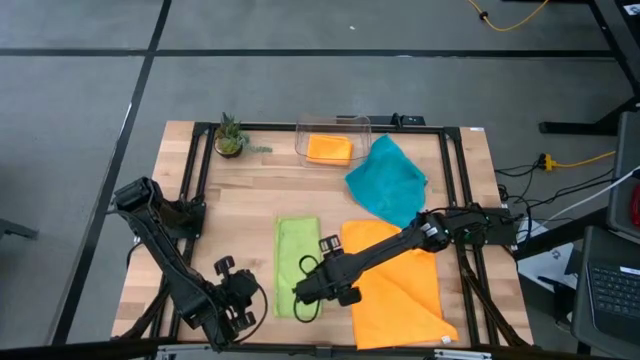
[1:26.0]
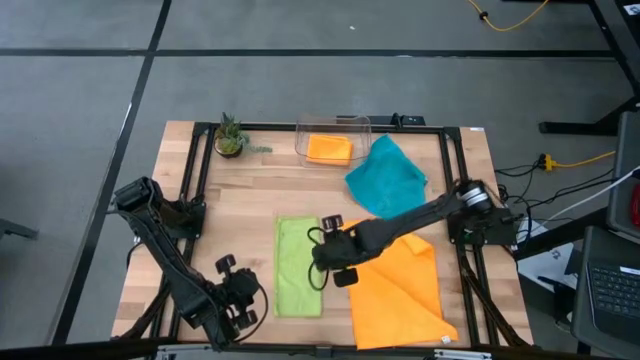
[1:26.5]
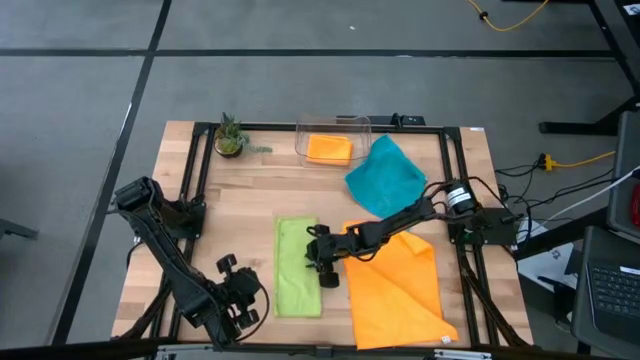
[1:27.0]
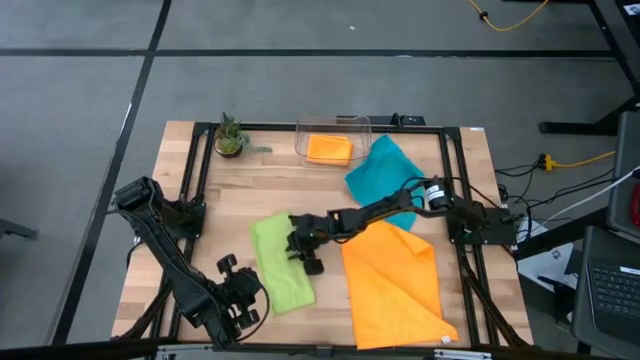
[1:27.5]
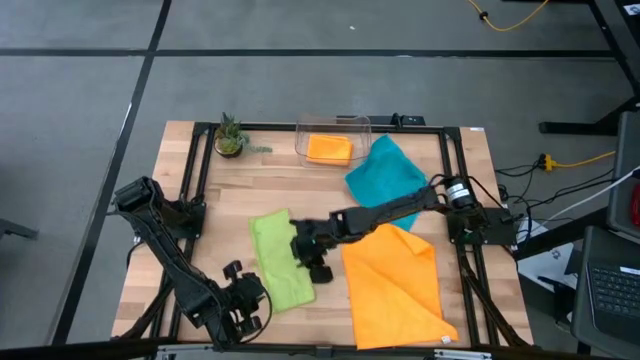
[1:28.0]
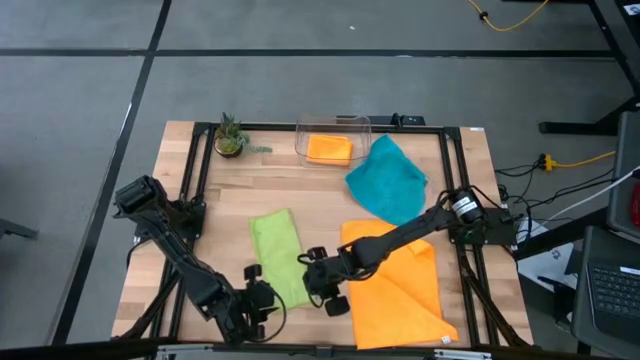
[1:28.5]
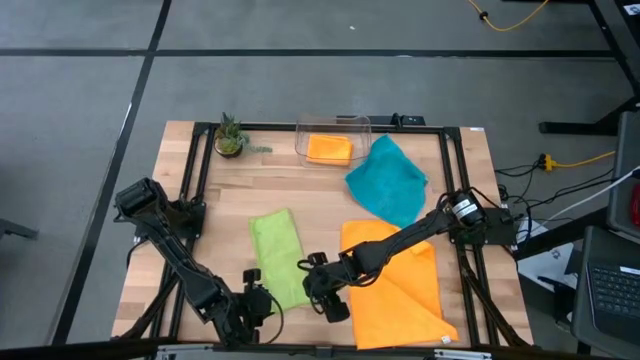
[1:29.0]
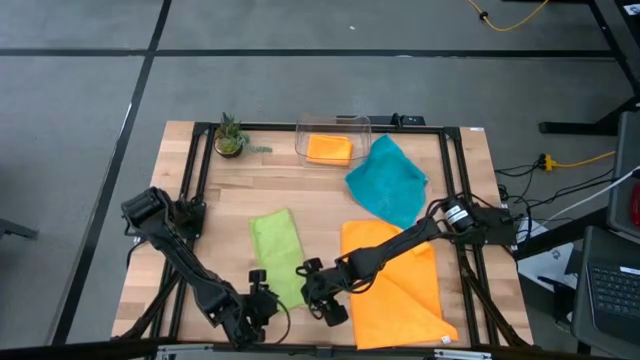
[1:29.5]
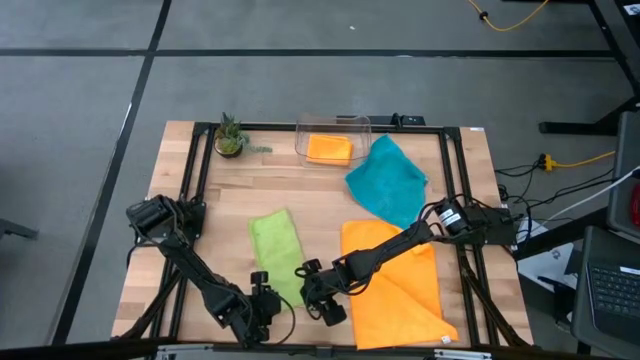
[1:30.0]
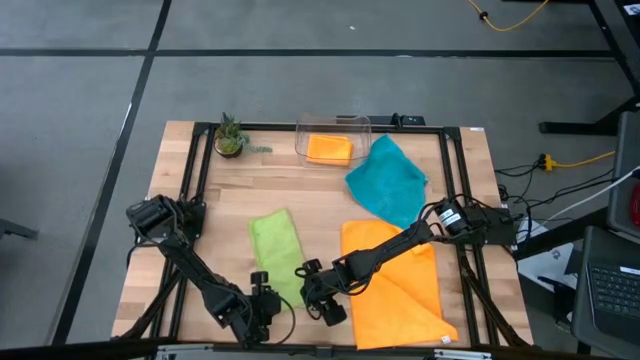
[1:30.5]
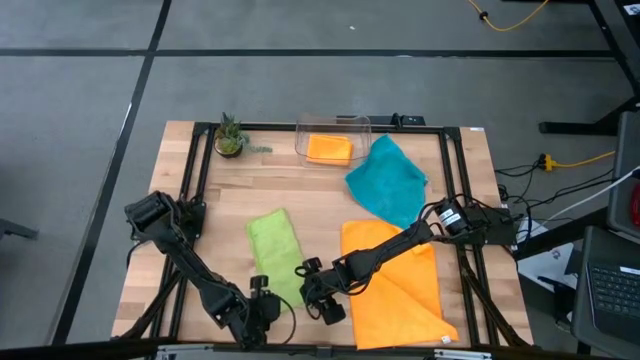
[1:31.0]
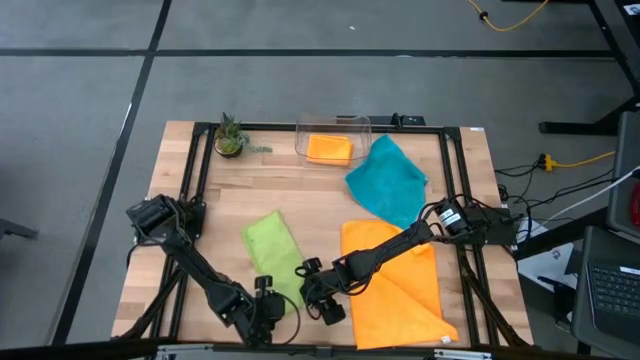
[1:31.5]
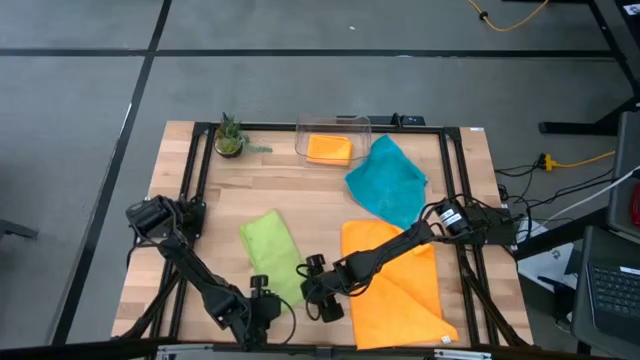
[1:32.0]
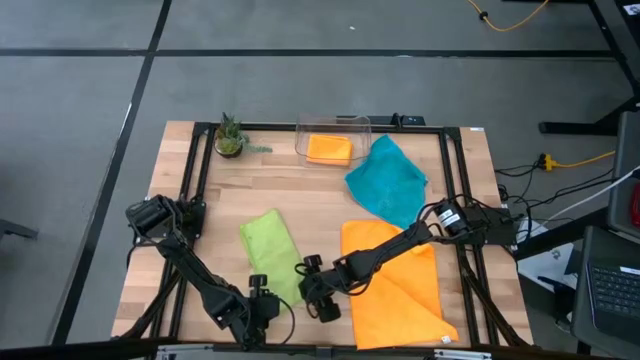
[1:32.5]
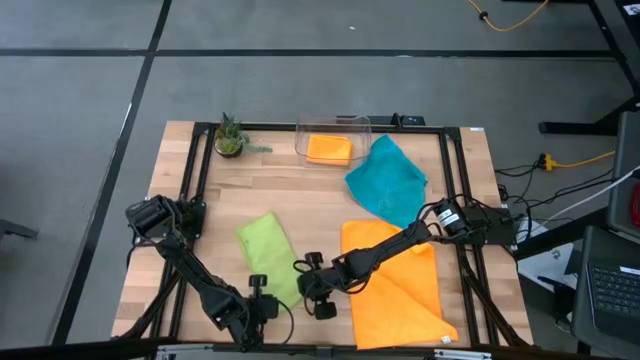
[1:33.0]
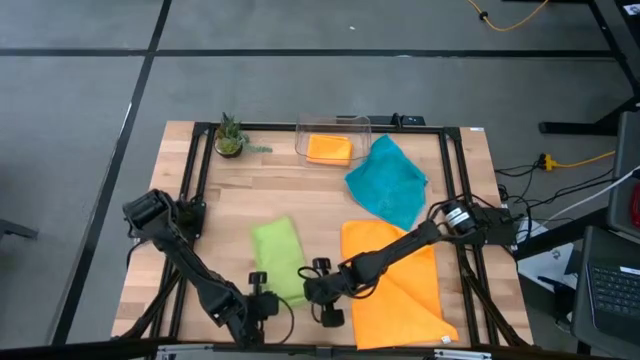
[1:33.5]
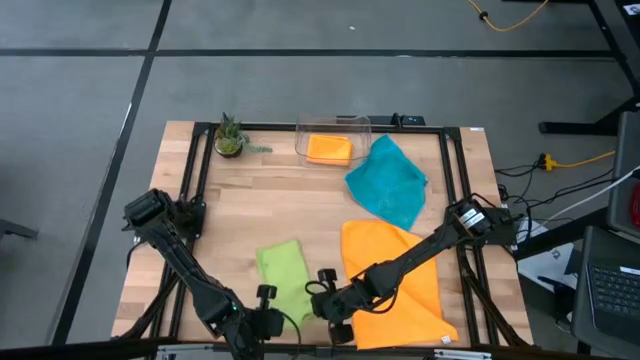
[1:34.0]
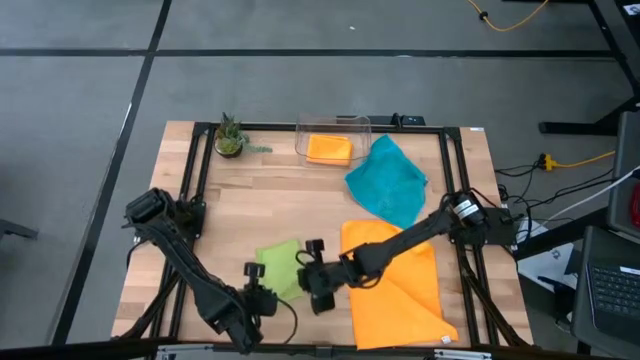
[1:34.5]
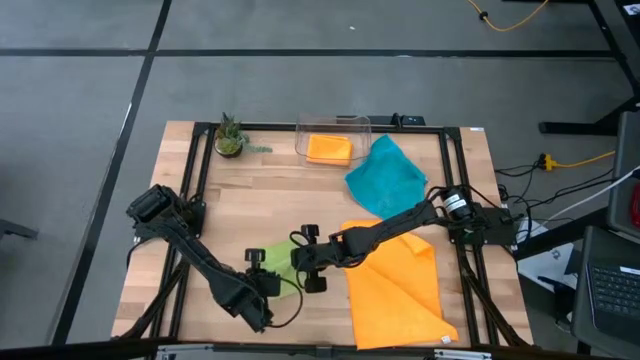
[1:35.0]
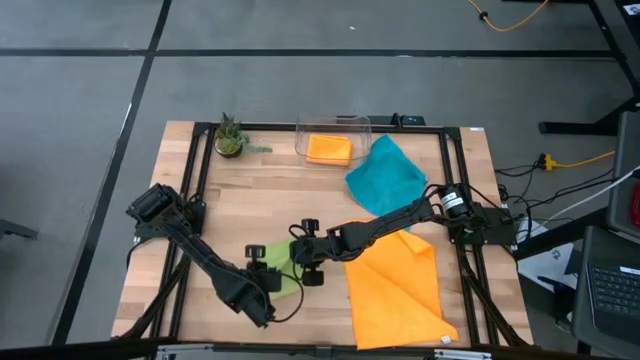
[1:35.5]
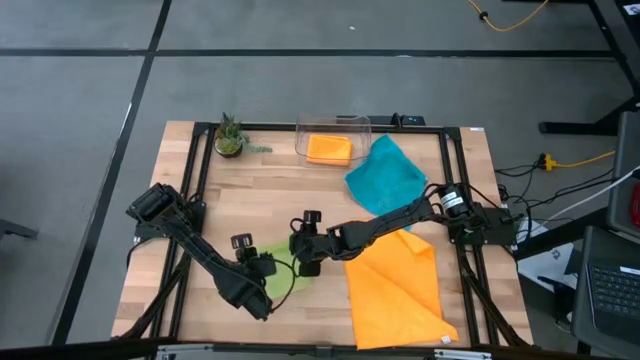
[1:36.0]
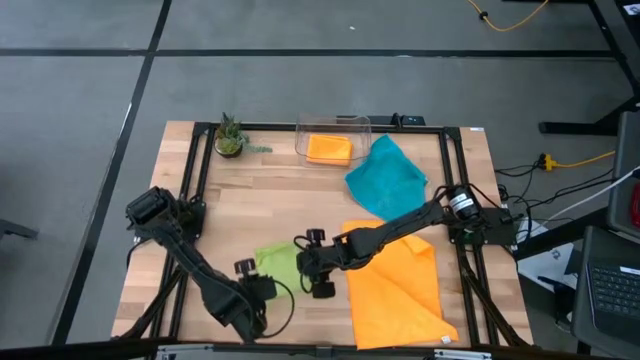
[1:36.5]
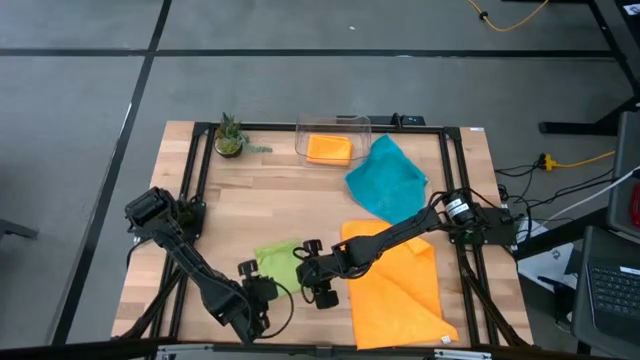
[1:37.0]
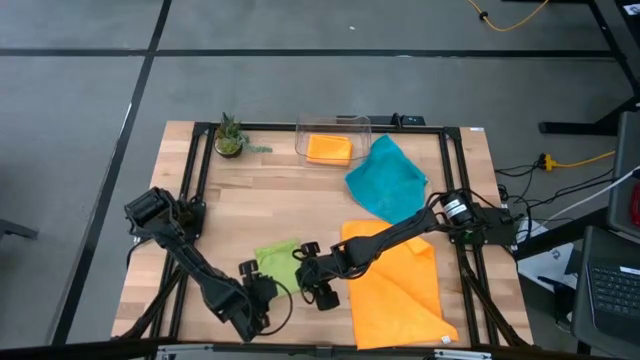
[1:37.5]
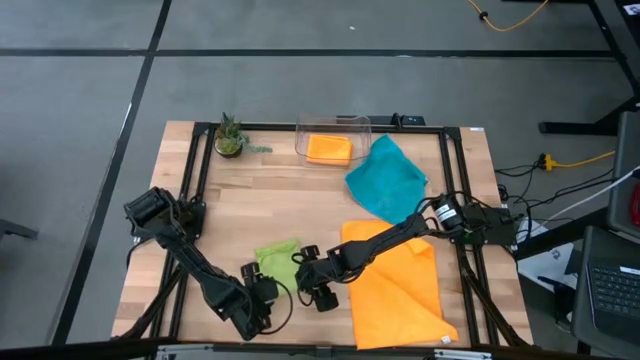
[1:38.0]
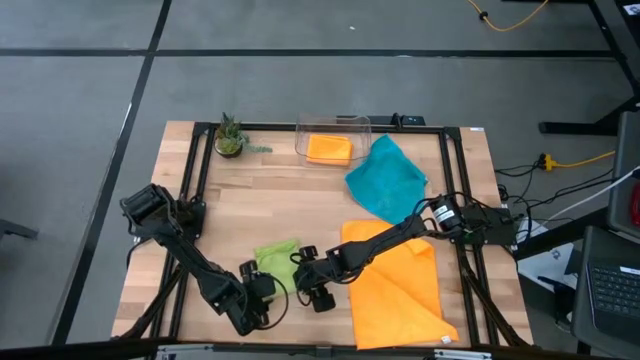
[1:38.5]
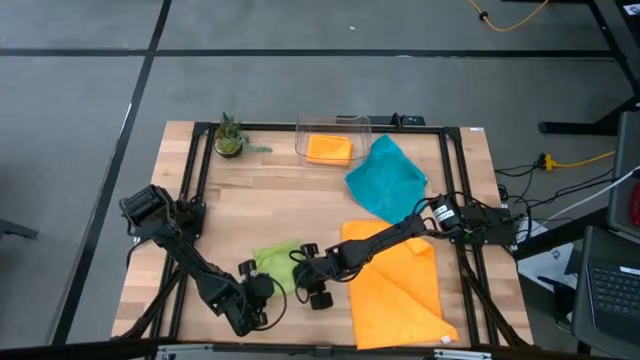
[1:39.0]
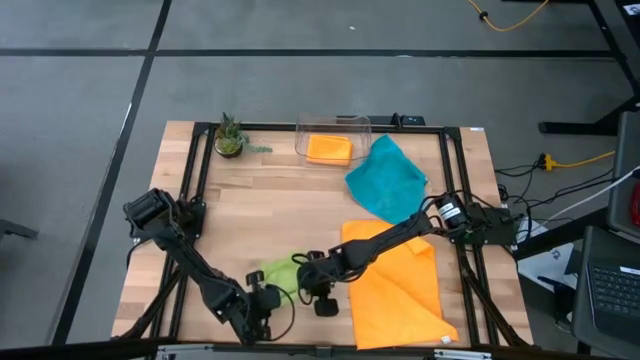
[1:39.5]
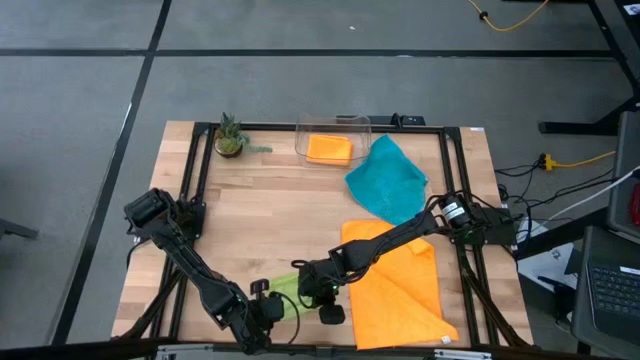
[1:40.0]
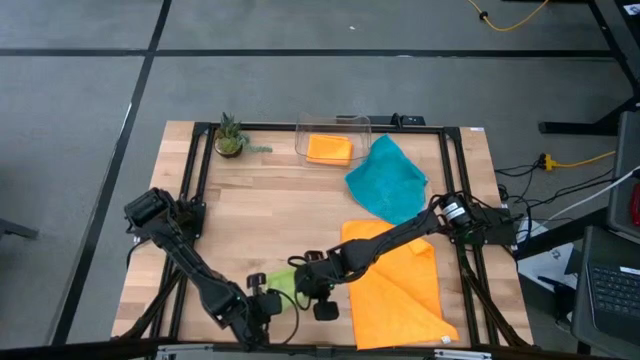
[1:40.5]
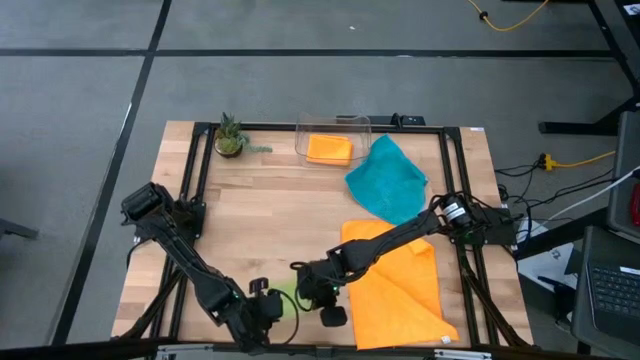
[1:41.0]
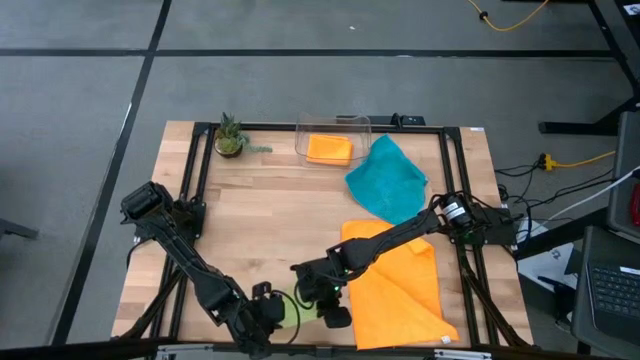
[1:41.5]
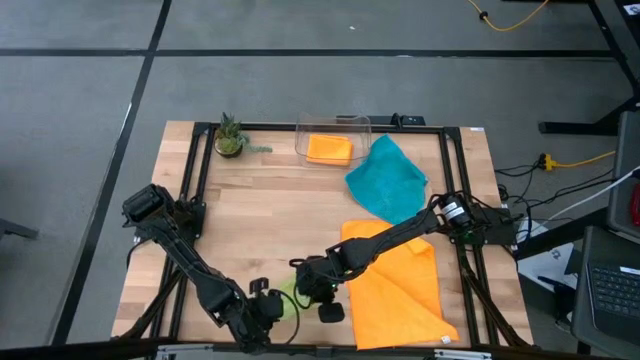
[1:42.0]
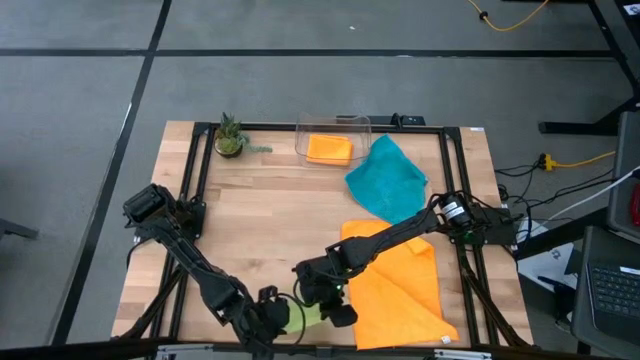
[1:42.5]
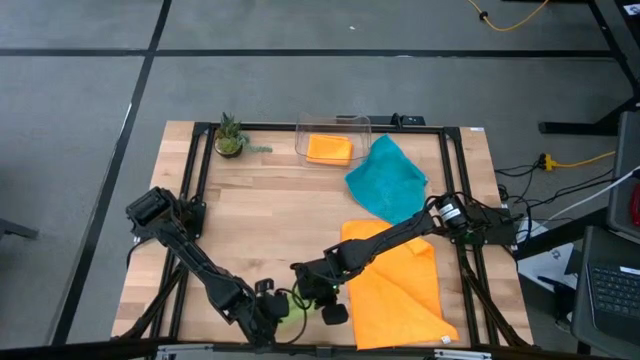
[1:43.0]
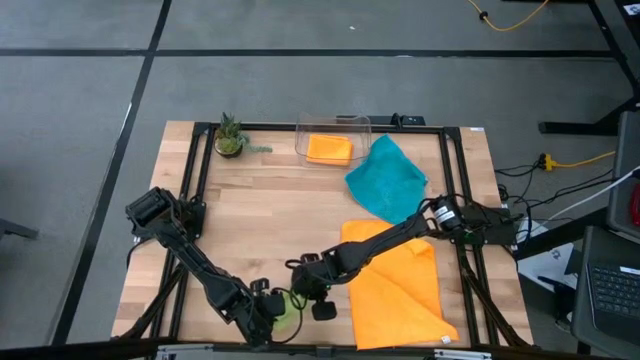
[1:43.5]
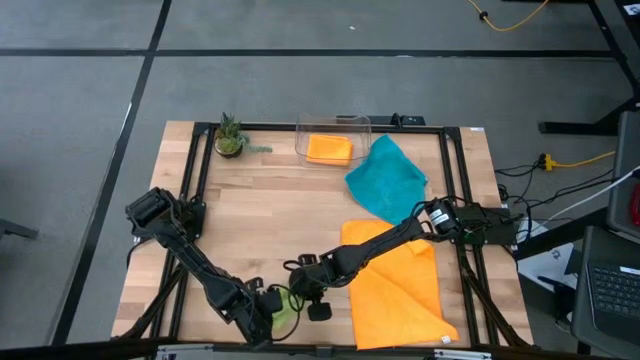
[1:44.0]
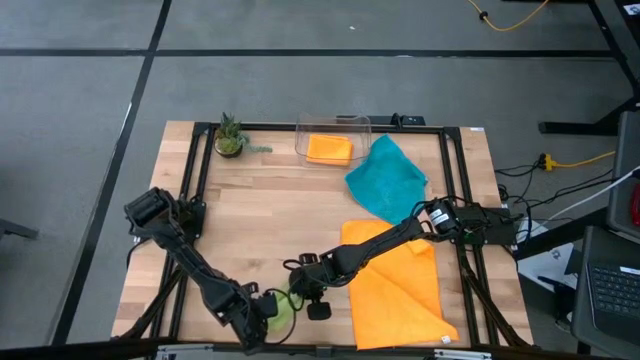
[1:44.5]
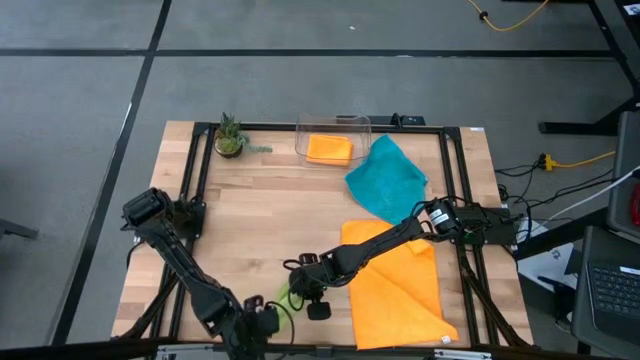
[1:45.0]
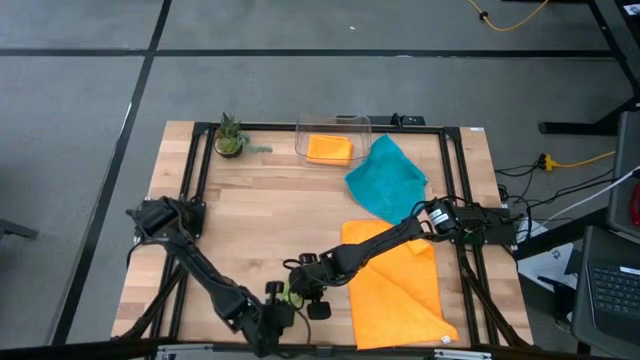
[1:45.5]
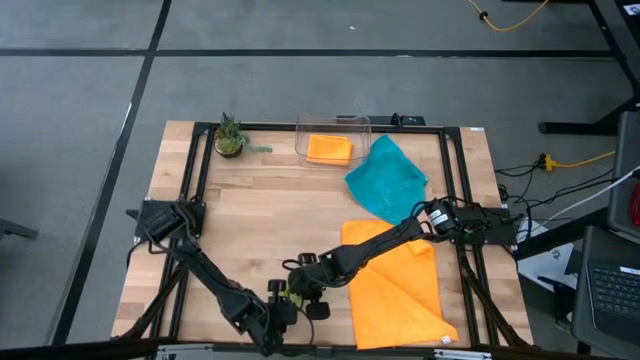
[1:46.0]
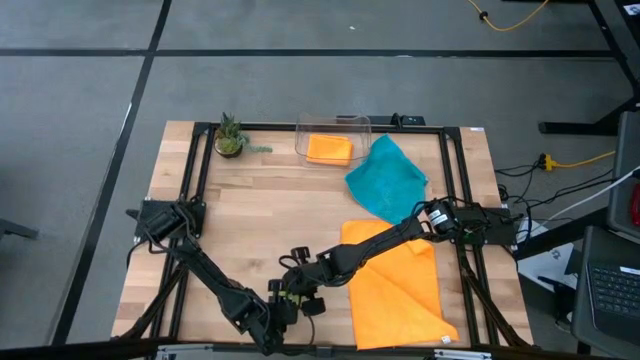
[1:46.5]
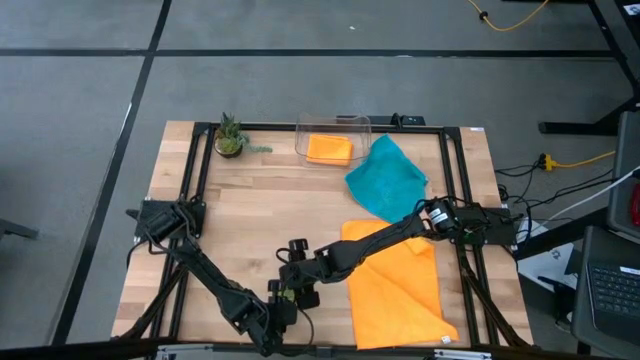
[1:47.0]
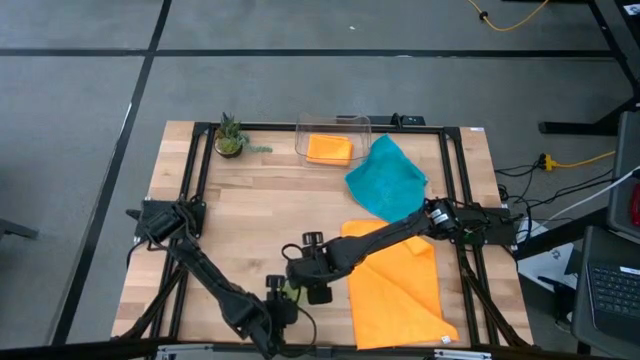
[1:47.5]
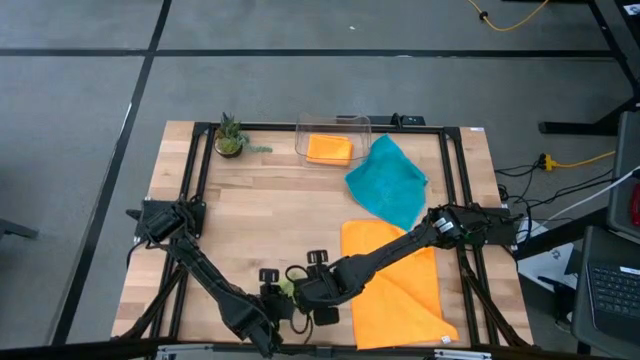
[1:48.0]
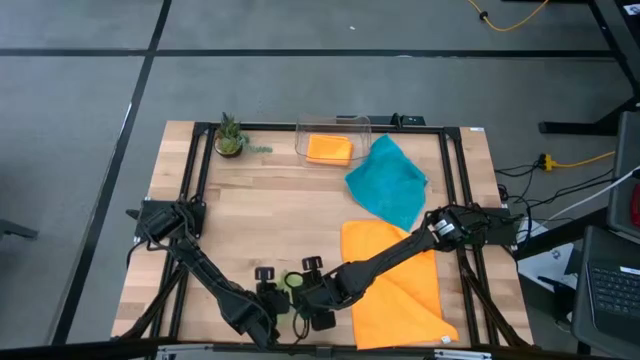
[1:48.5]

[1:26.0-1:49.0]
Task: Fold microfiber towels
Fold the green microfiber cloth
